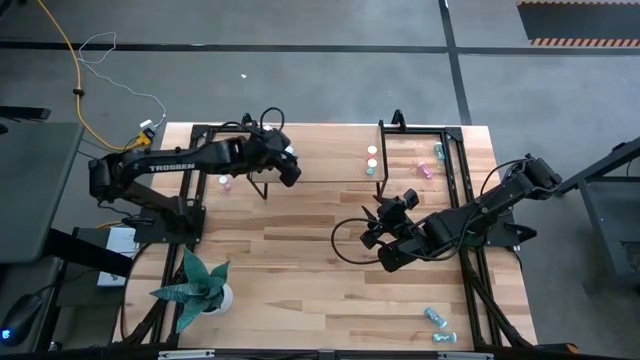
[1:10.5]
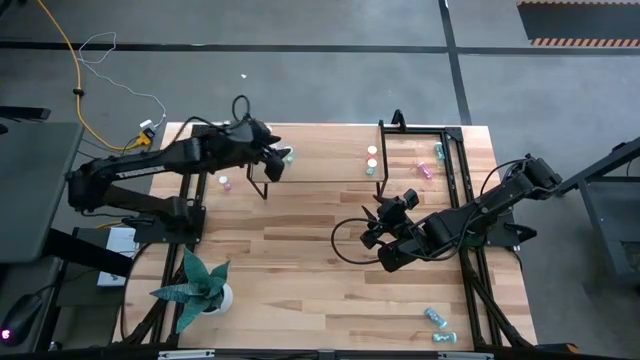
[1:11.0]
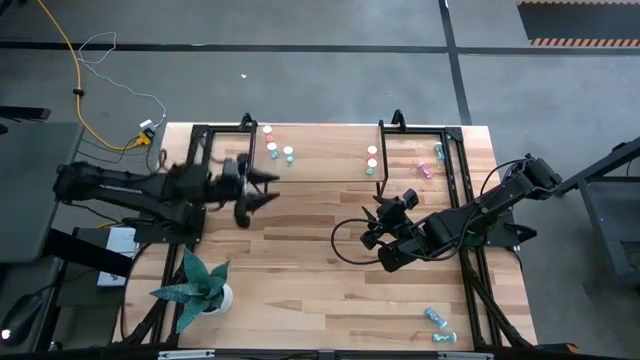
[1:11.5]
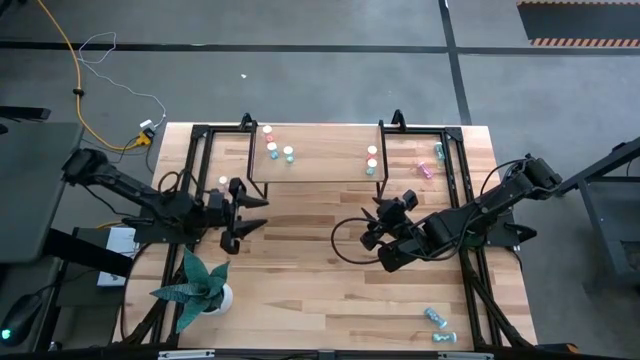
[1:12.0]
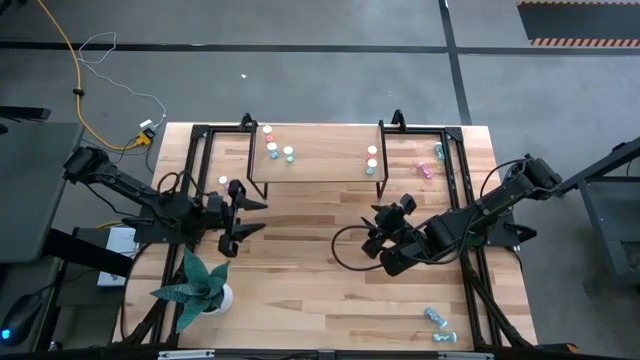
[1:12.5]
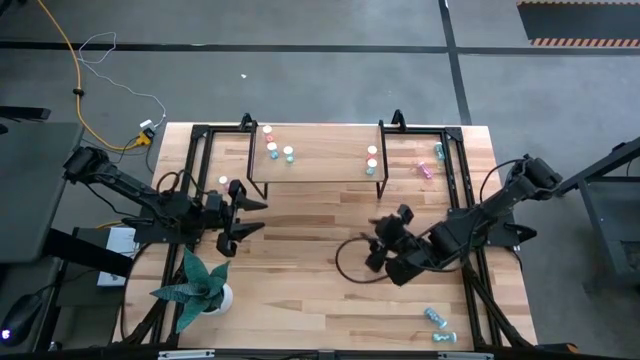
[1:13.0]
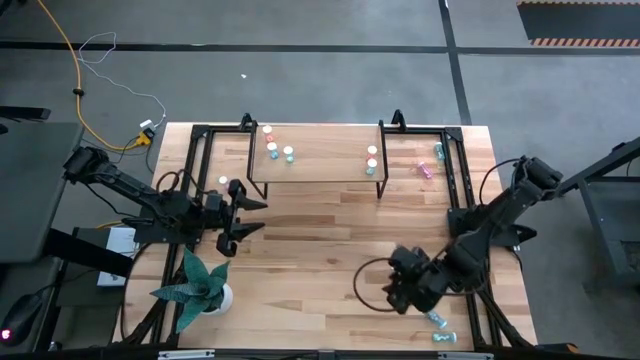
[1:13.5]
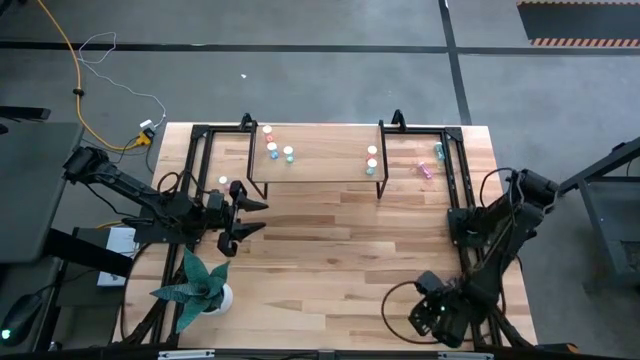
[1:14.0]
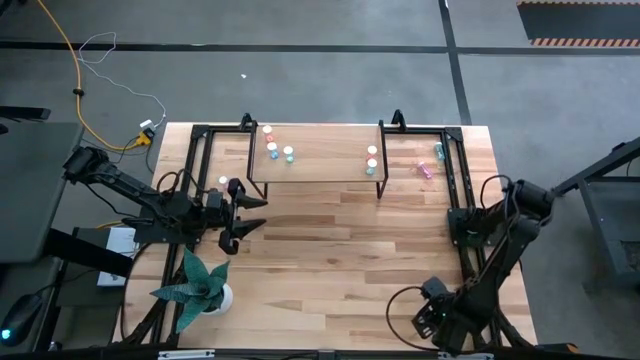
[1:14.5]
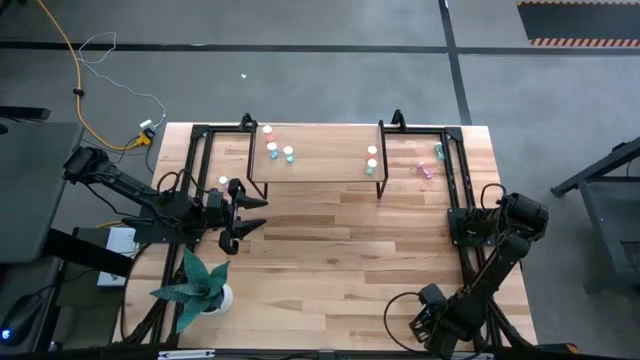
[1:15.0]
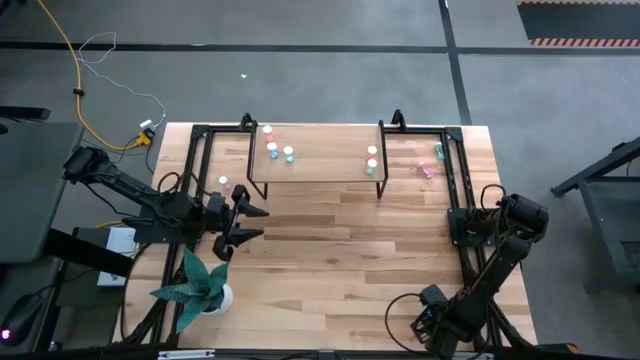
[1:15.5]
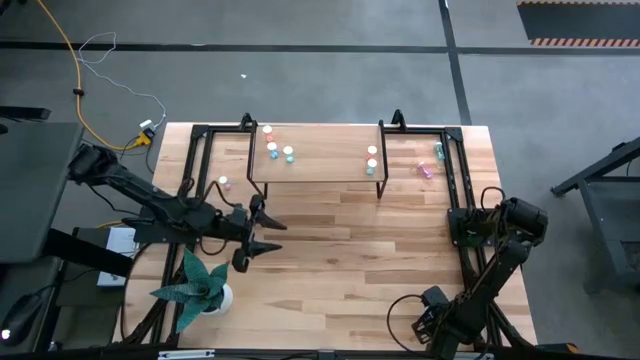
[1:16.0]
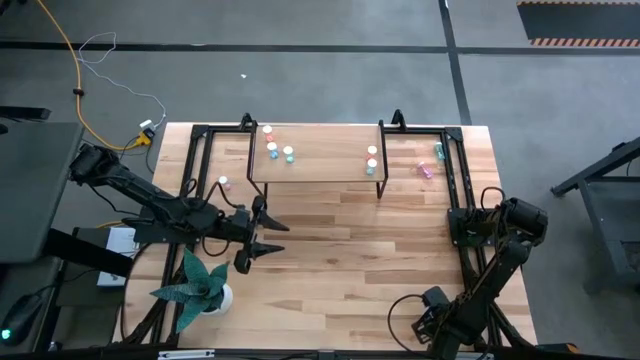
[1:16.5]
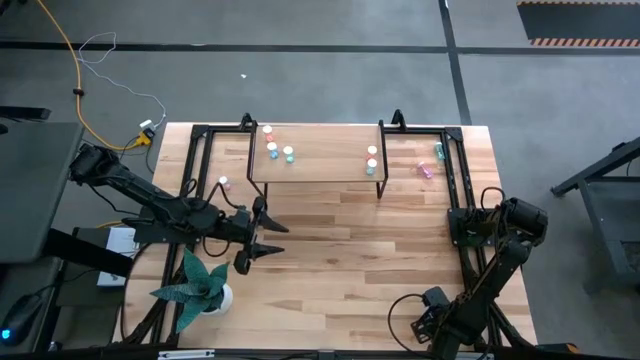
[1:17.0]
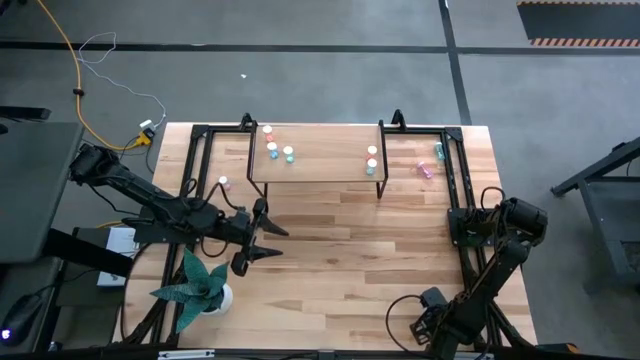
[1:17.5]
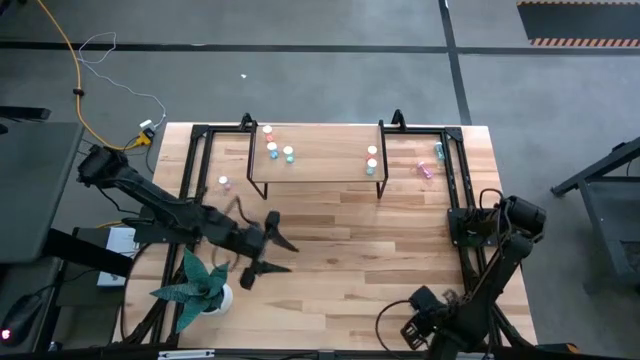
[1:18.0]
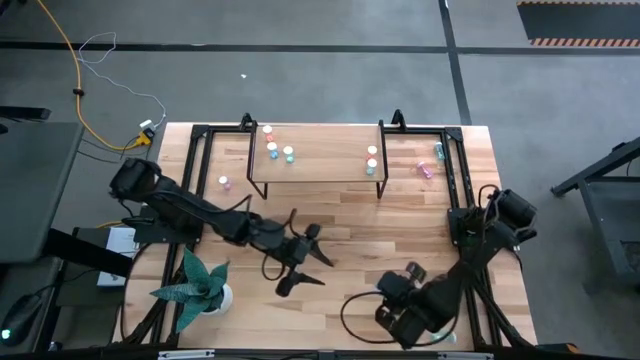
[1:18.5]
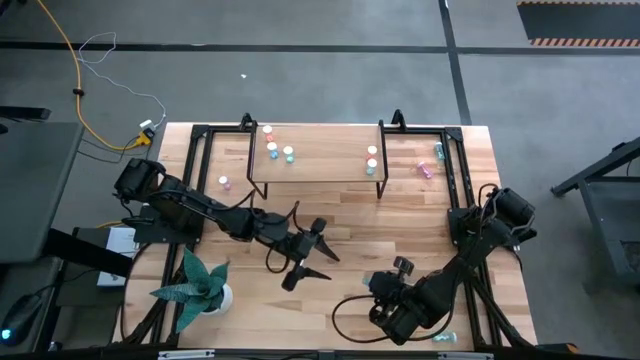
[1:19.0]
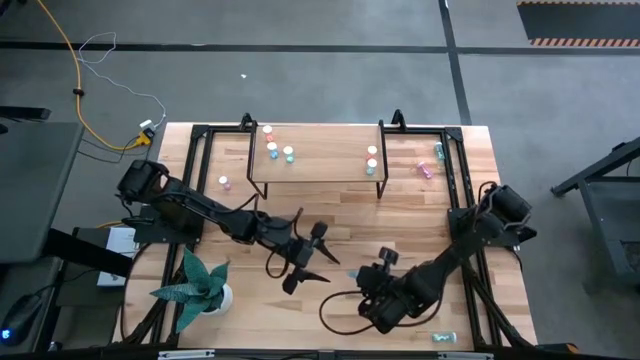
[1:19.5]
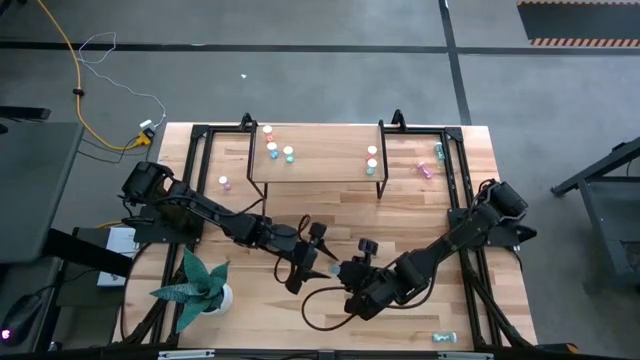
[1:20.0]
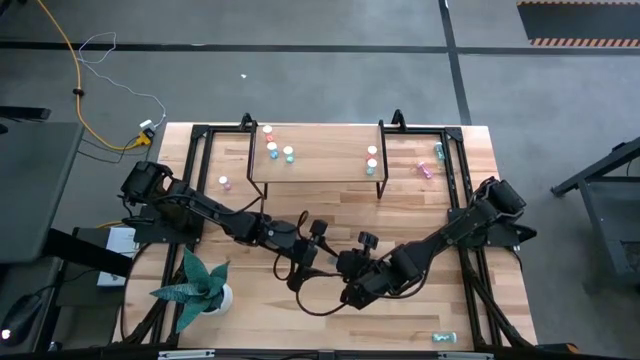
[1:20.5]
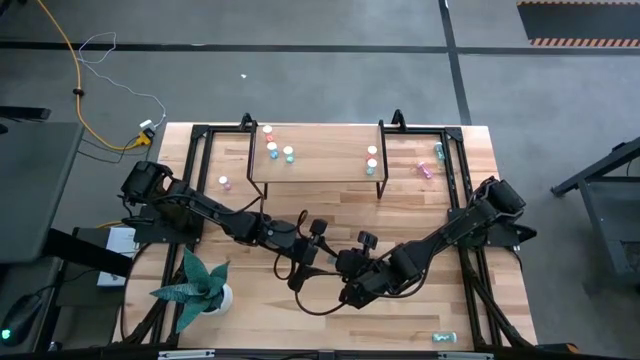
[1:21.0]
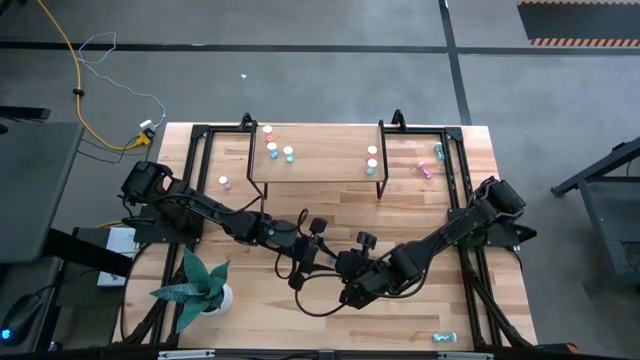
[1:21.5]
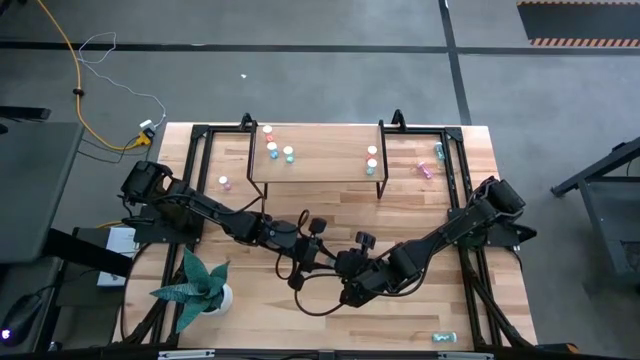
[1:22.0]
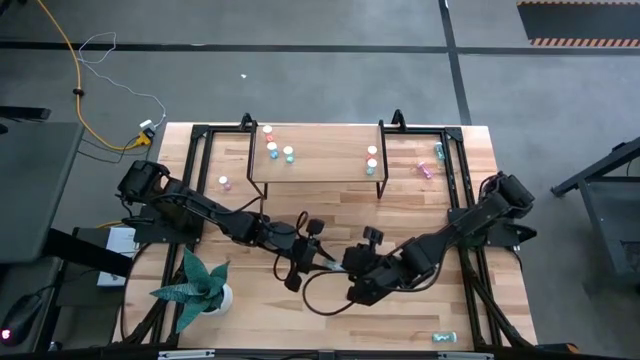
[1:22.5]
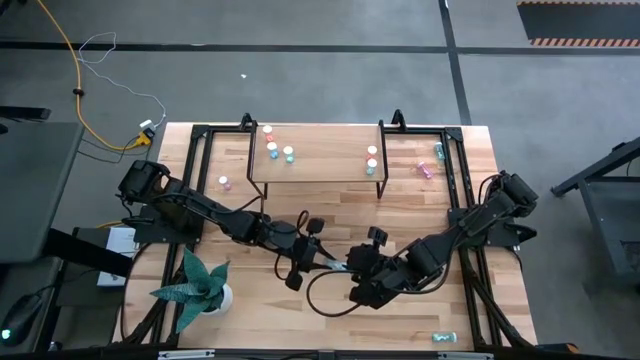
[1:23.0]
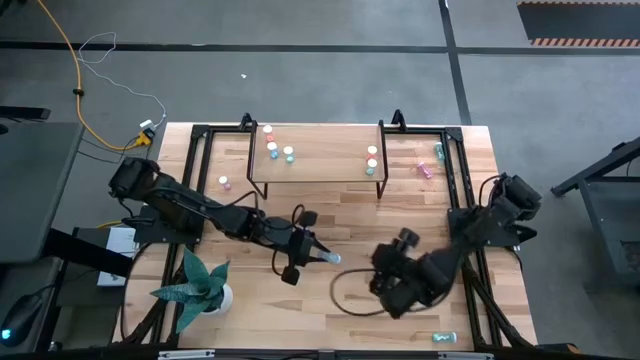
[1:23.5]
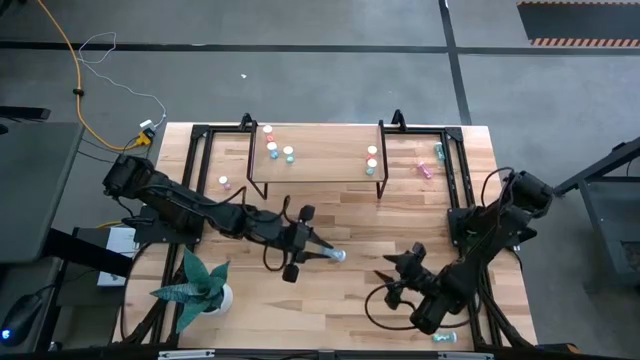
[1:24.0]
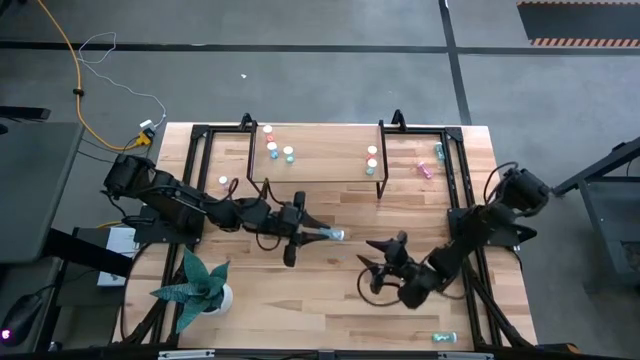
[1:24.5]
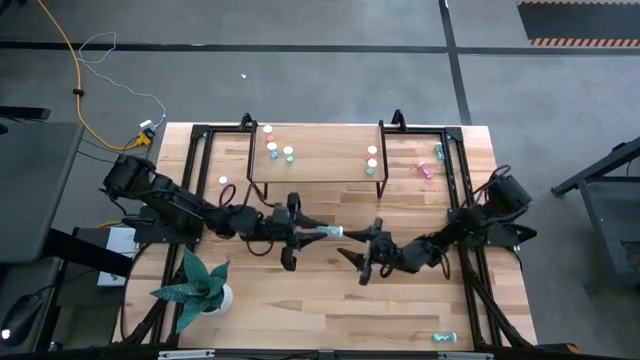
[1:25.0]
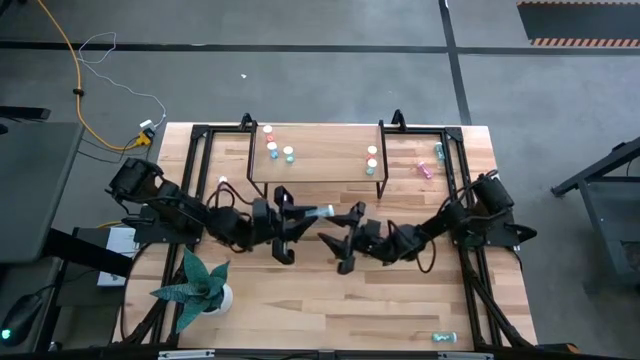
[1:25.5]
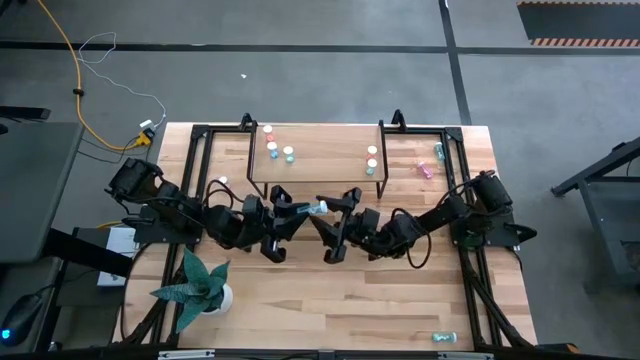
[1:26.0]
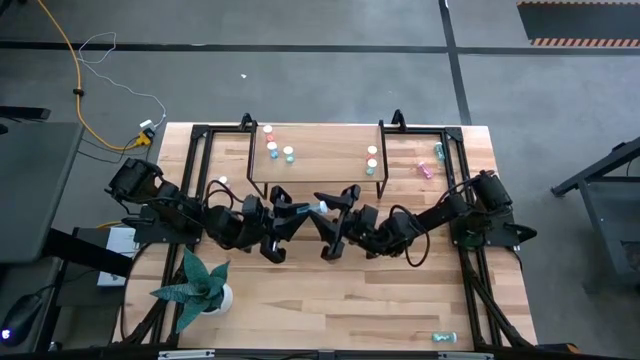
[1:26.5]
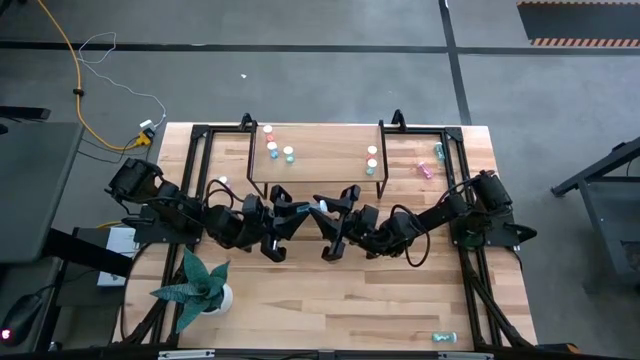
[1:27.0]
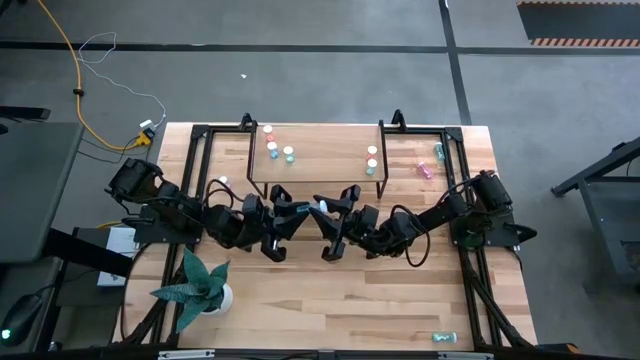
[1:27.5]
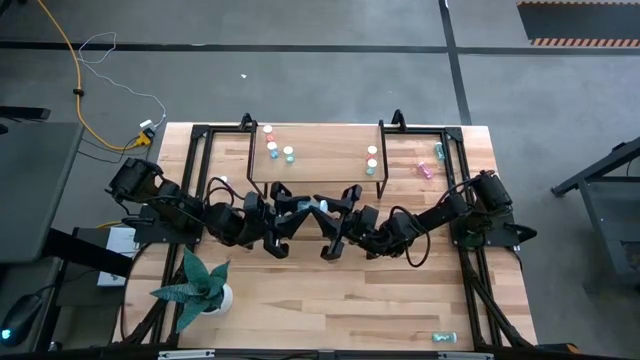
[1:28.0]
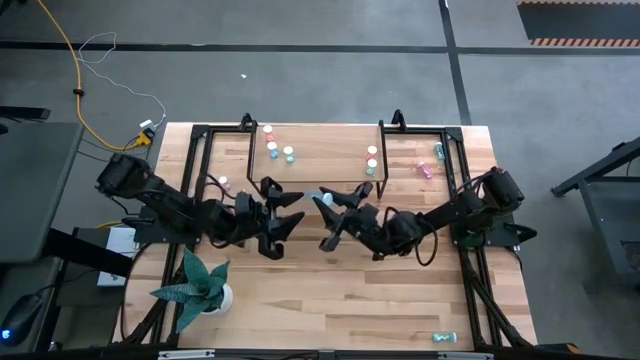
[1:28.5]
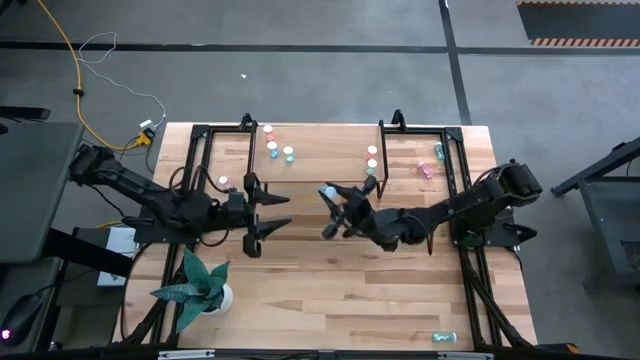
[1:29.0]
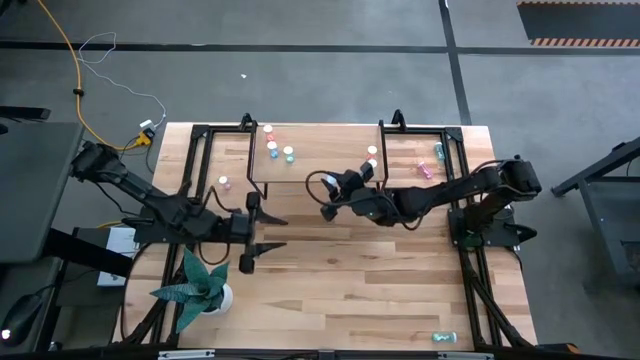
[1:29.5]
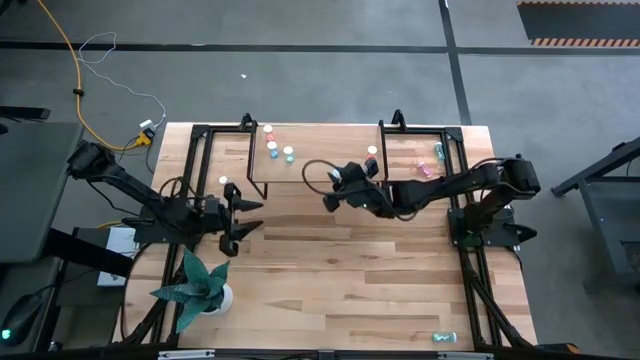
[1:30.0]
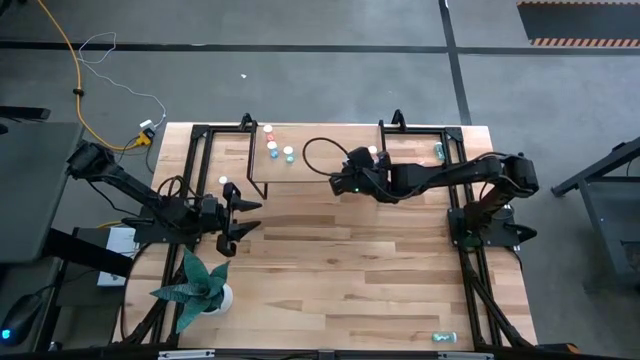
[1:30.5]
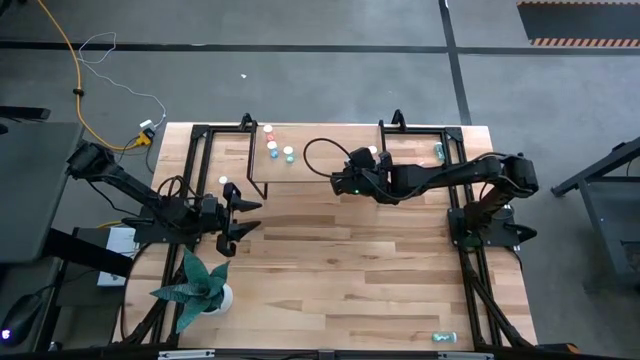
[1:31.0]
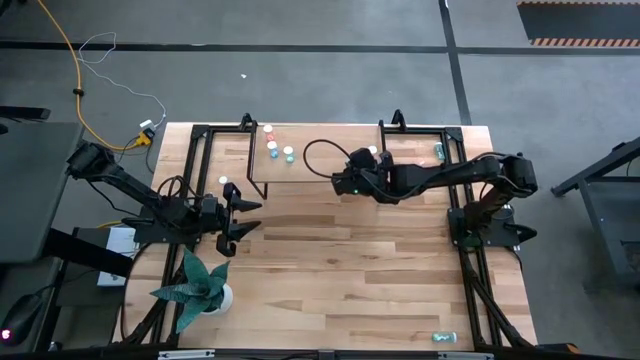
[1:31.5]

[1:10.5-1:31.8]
Task: Pick and place medicine bottles onto shelf by color
Put the blue pill bottle on the shelf
